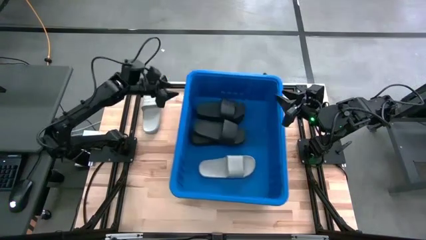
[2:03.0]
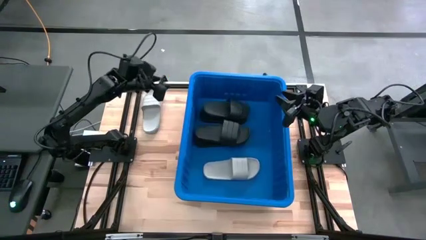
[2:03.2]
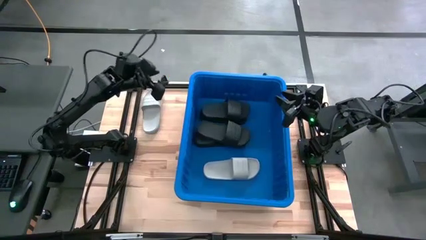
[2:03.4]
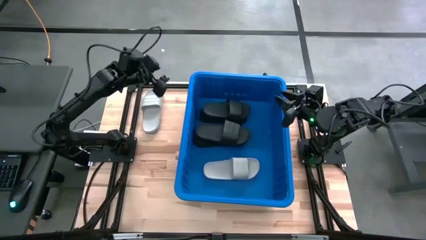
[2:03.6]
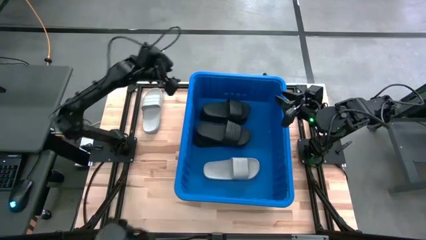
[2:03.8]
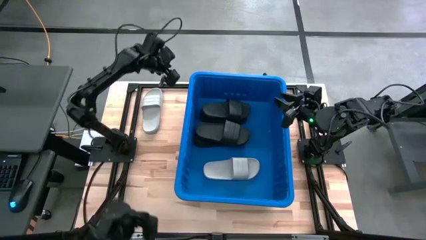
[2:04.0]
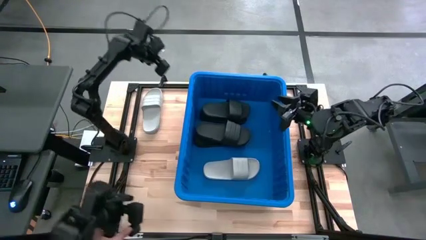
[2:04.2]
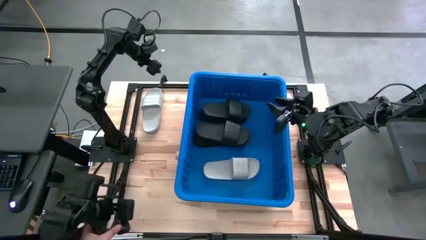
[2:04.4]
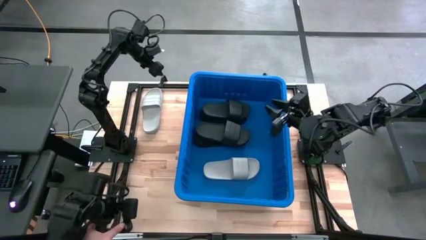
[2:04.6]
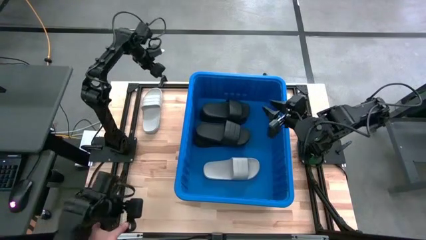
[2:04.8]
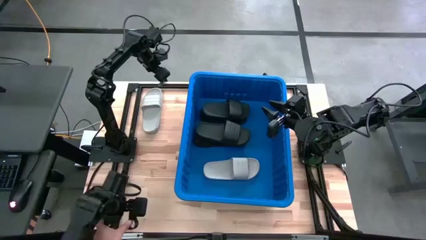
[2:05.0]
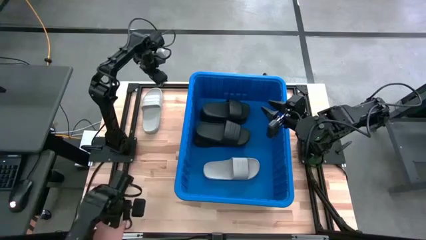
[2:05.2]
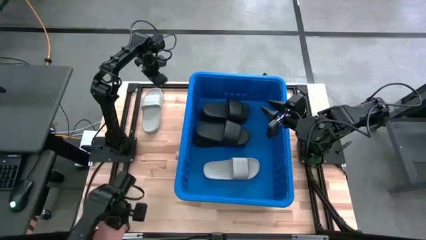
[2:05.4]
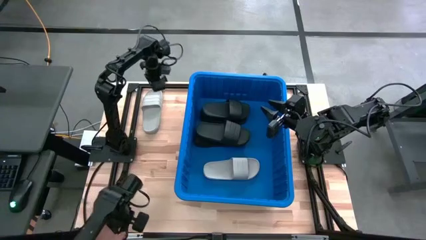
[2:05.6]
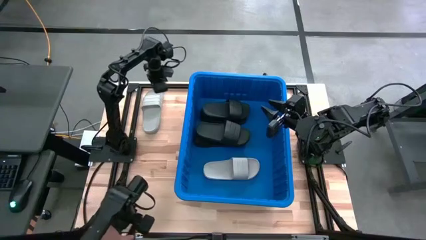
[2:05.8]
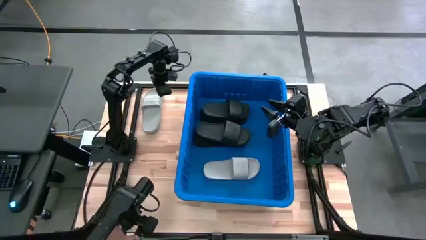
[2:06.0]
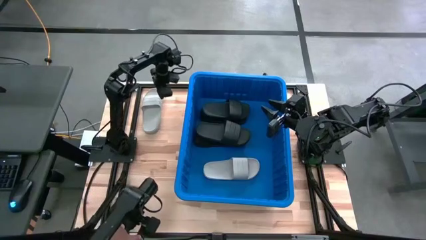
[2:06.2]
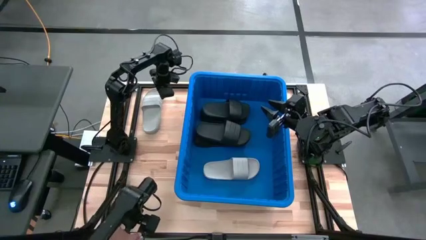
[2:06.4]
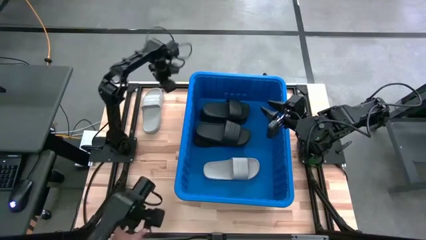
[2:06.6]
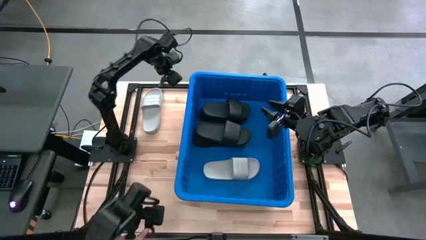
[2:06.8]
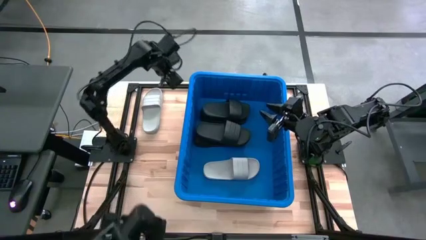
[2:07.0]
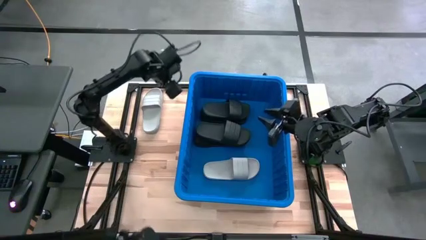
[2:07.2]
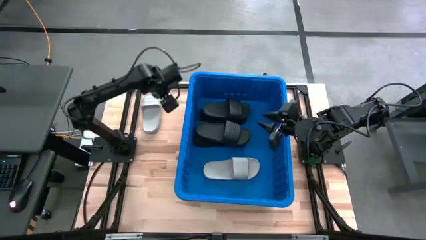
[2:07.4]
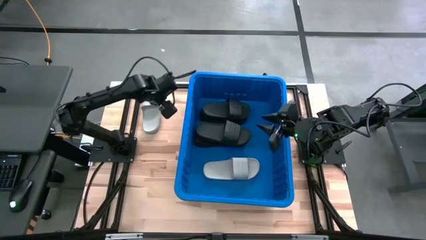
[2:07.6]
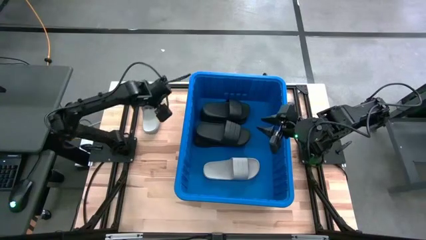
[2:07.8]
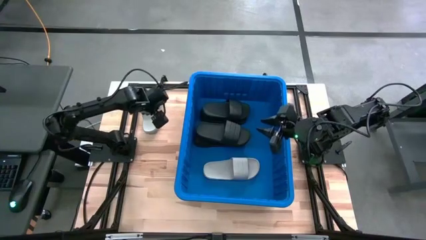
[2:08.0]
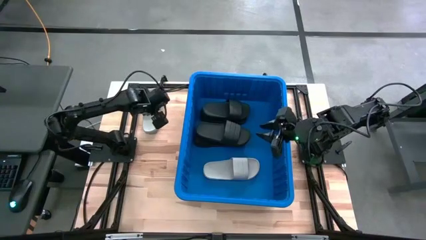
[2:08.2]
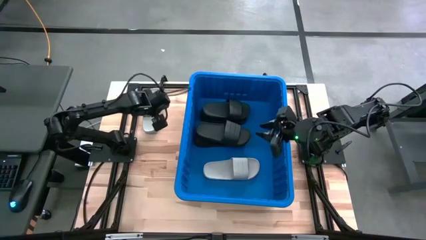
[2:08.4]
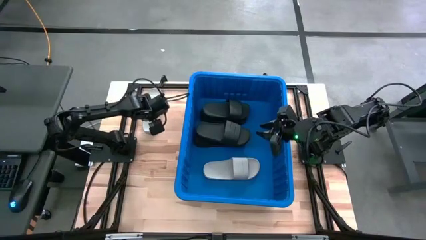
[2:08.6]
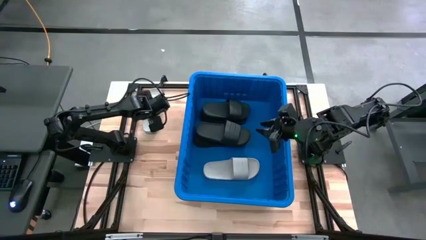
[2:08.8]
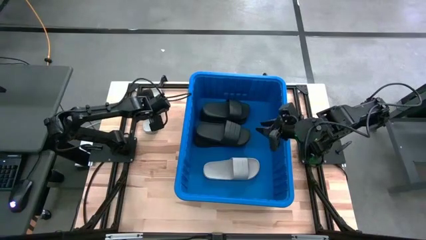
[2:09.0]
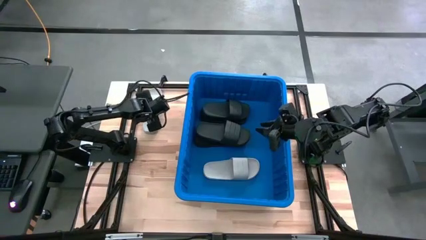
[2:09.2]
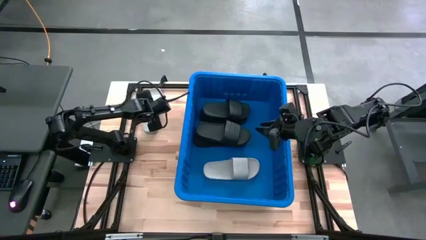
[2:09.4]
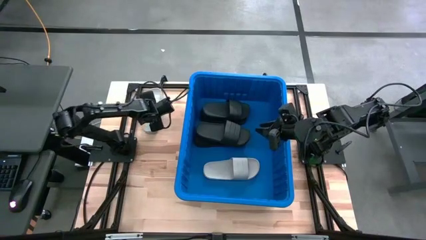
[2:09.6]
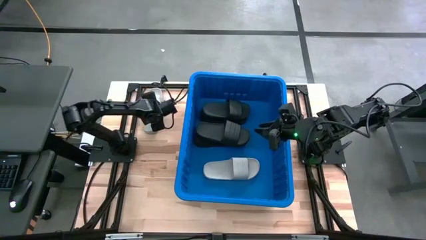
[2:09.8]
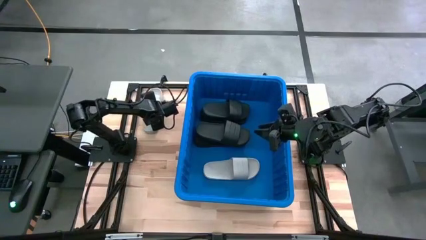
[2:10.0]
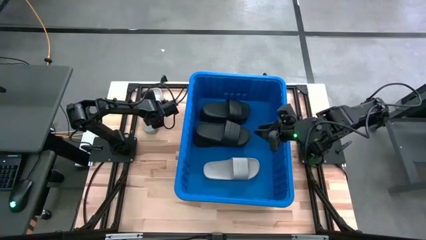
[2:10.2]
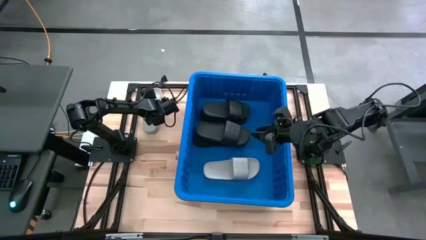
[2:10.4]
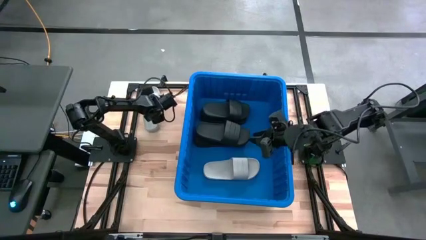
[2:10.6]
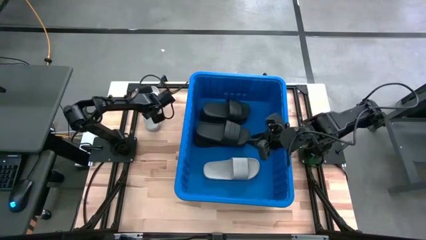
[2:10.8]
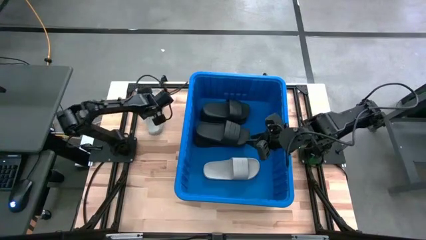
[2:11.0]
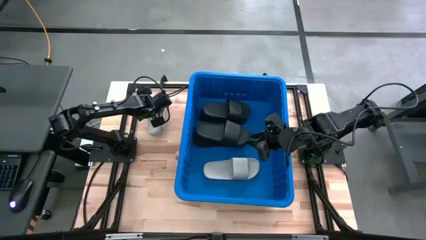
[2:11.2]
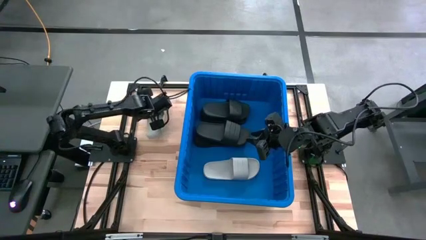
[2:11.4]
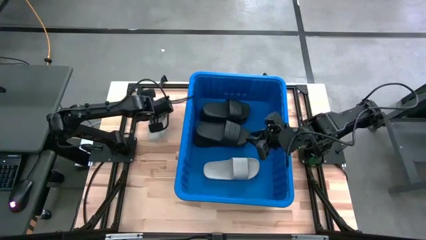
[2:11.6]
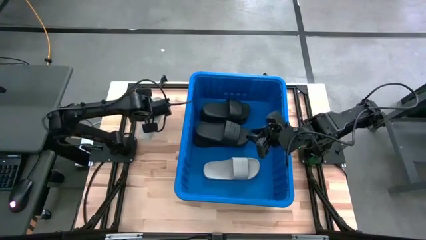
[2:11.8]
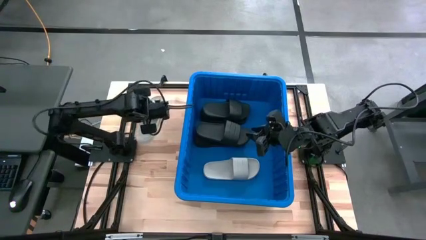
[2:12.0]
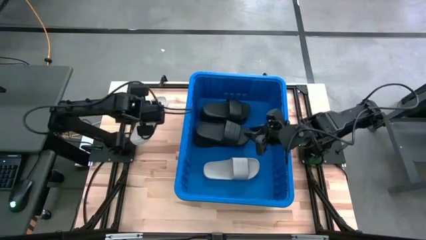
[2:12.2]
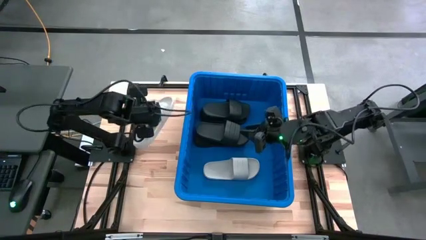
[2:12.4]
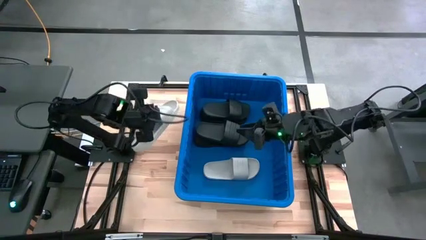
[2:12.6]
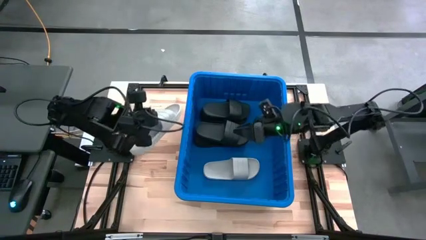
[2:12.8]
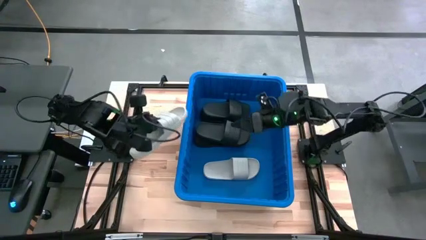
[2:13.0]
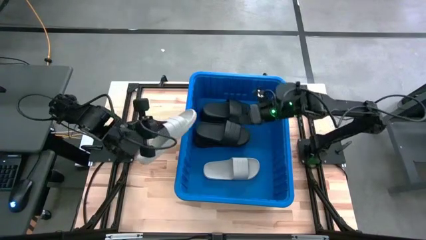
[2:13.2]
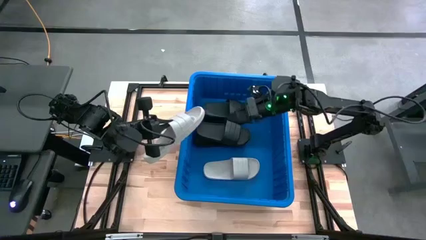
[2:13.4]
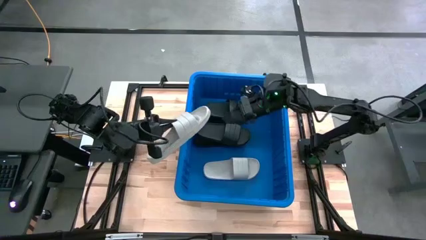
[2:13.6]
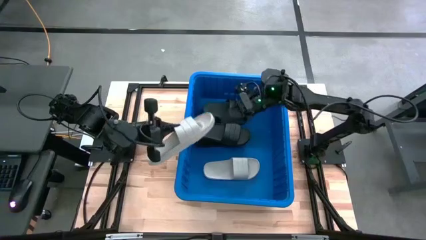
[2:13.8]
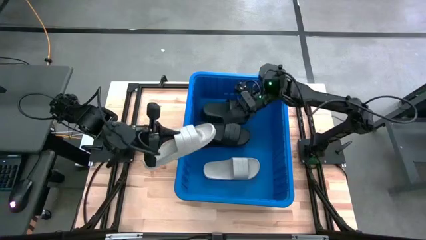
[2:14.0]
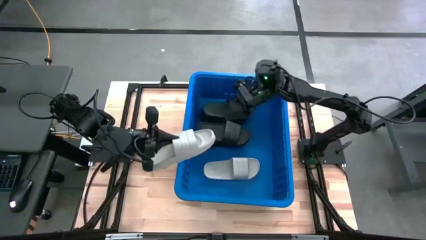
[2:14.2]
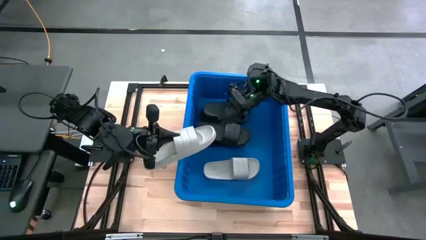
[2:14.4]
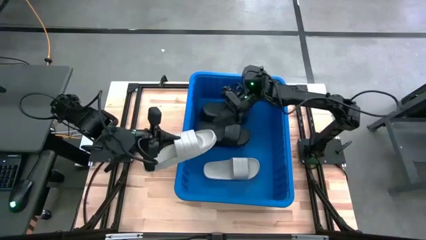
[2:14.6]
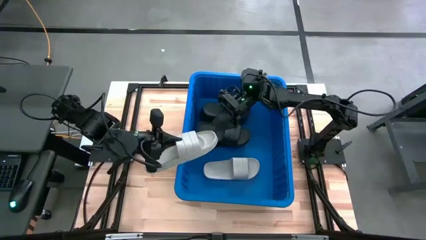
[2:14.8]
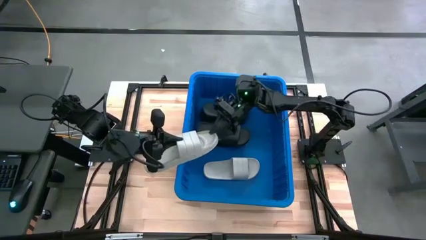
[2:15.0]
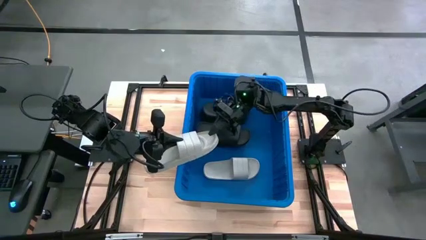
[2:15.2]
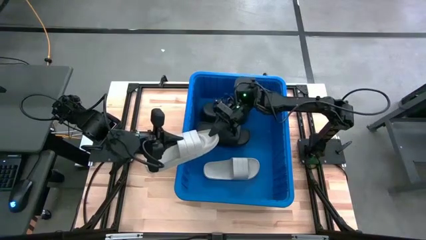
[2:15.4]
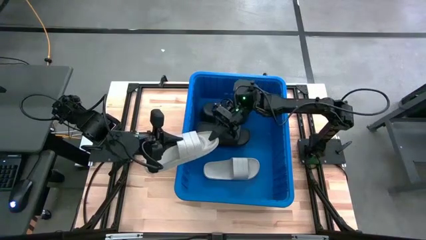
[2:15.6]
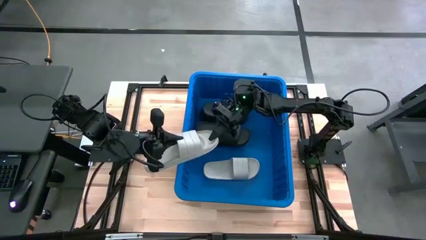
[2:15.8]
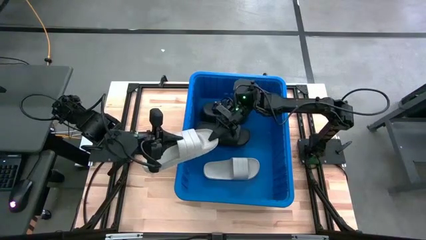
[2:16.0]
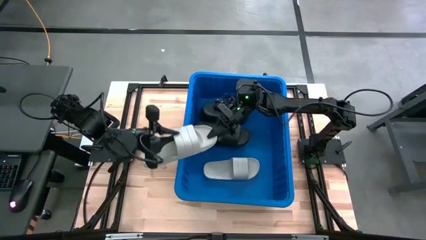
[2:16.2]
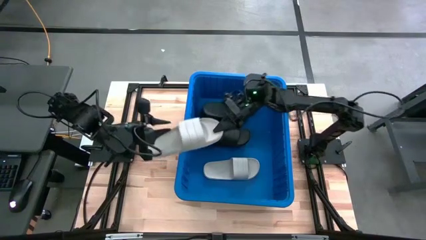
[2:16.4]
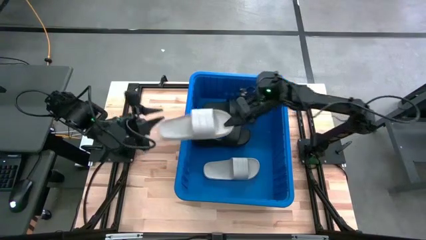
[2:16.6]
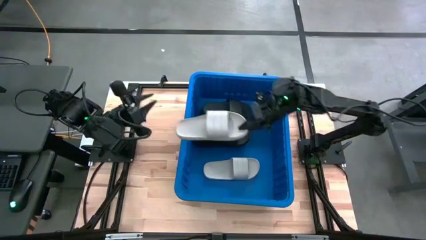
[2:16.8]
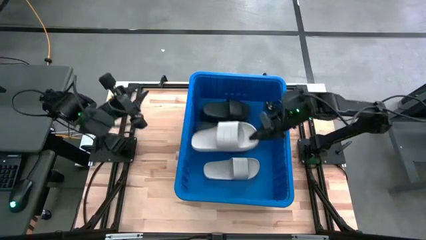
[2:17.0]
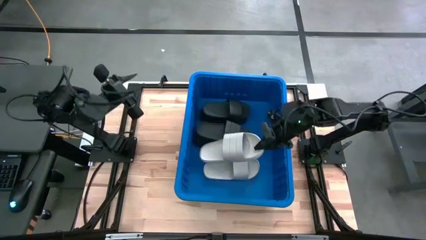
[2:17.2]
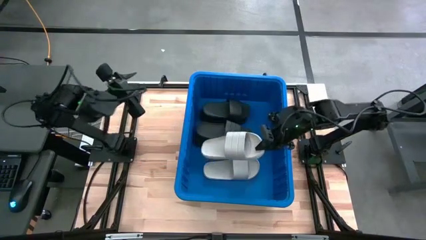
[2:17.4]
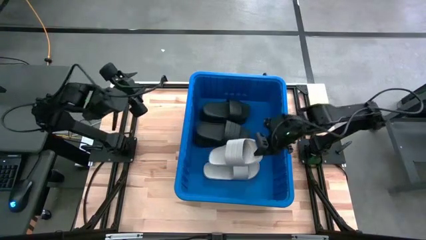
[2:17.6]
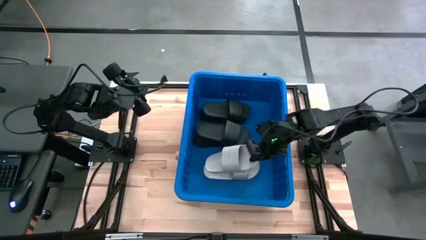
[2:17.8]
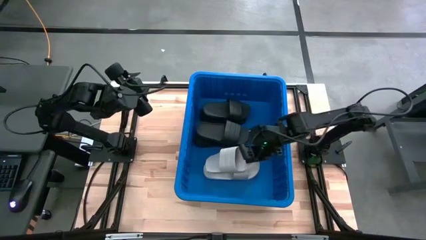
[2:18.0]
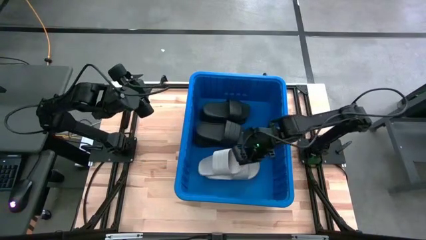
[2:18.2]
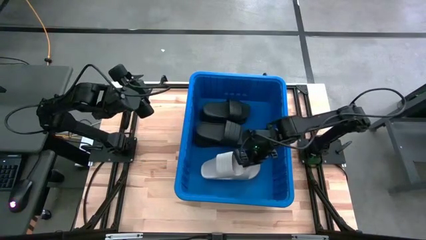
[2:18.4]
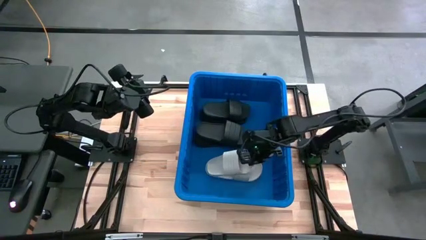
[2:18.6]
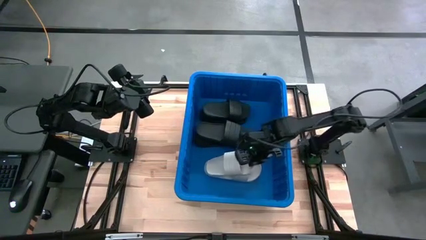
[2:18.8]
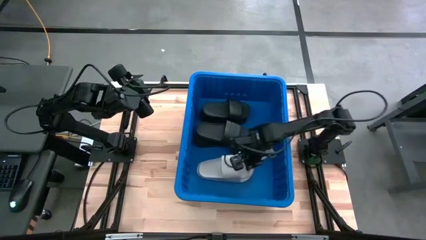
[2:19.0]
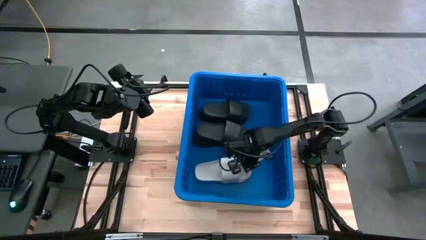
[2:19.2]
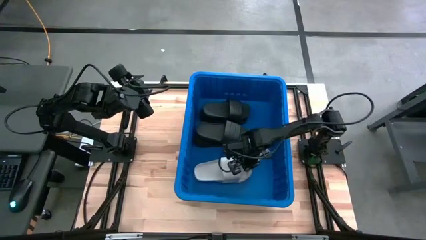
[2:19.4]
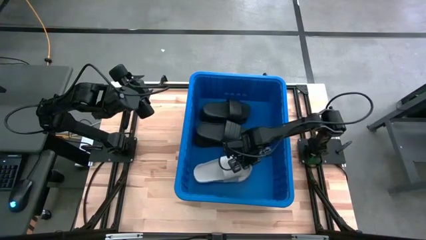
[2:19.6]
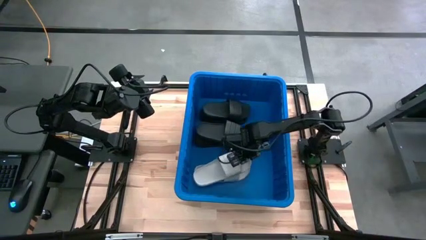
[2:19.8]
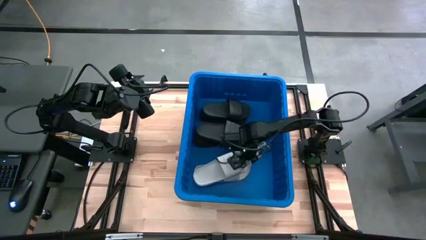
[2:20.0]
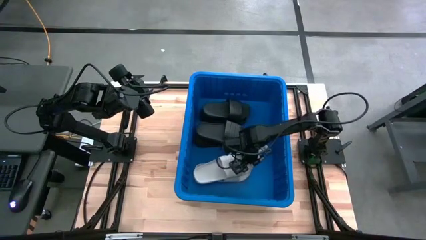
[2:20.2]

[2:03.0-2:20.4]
Task: Pick and place slides into bin
Put the white slipper into the bin
